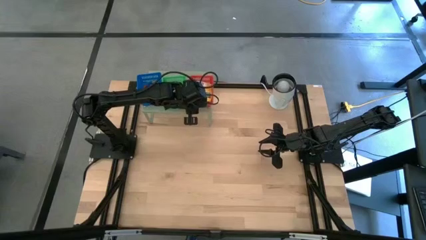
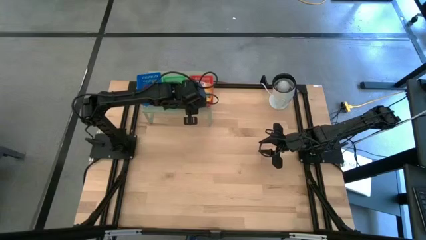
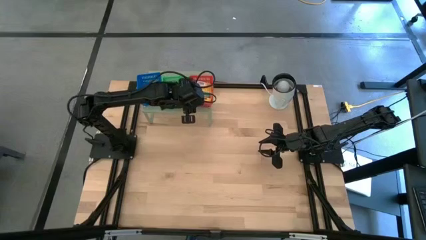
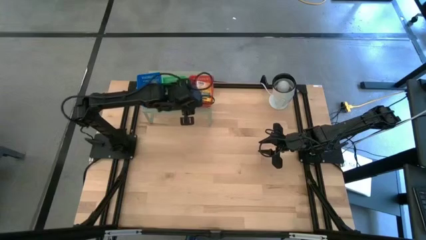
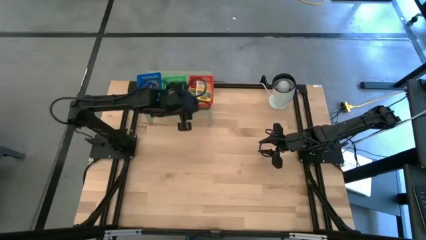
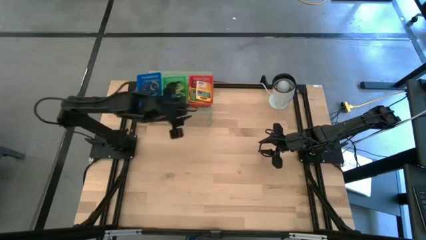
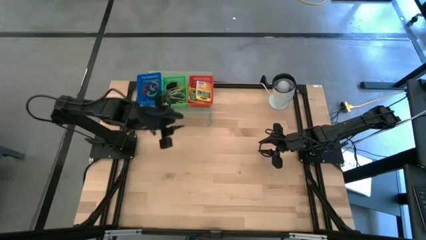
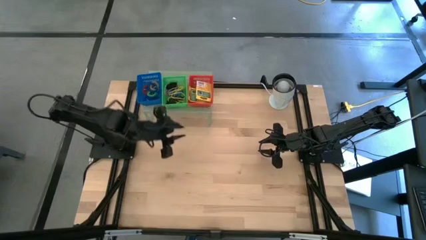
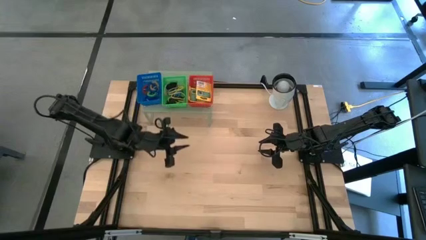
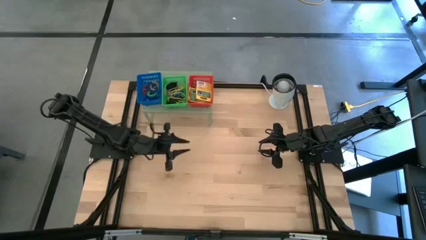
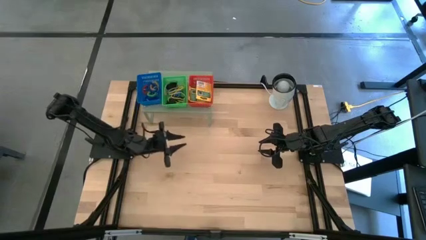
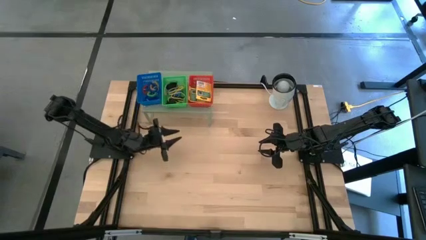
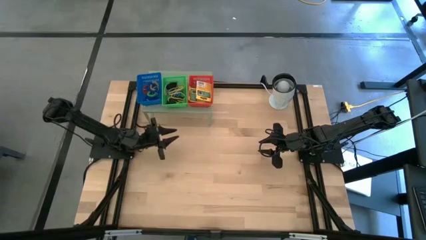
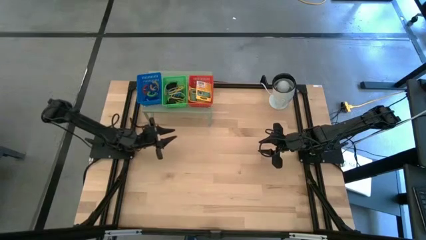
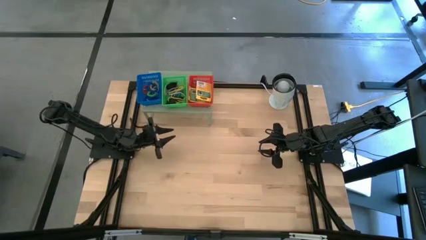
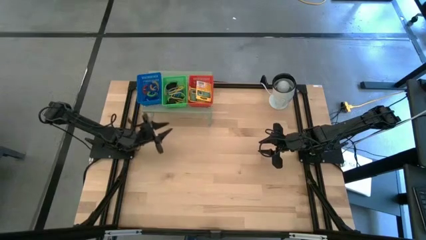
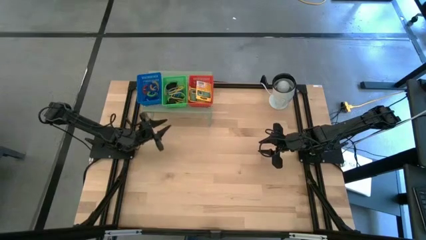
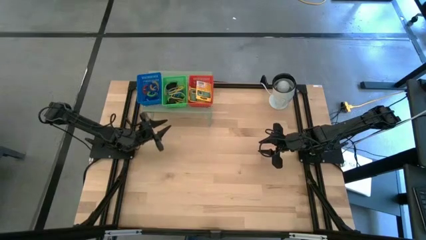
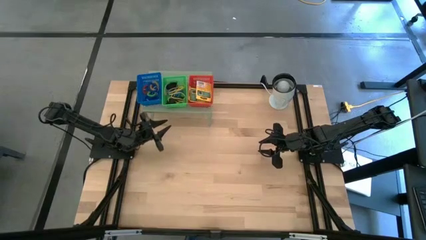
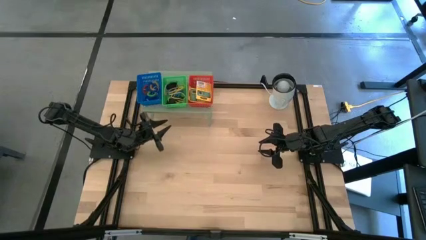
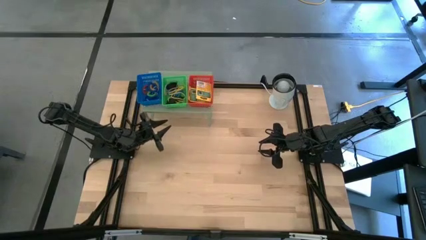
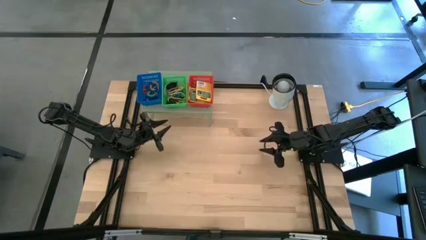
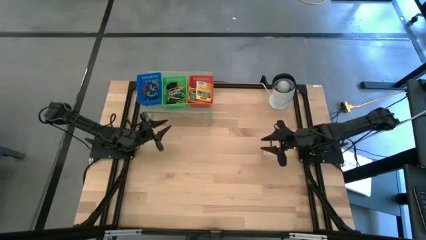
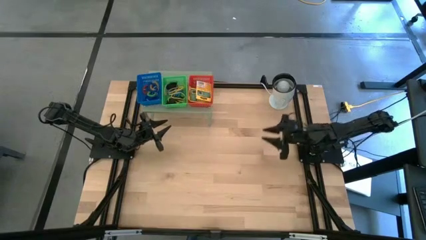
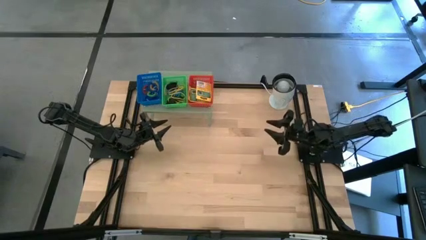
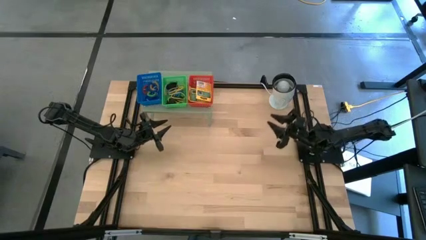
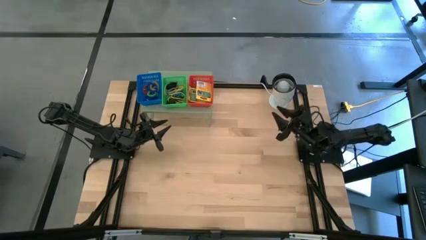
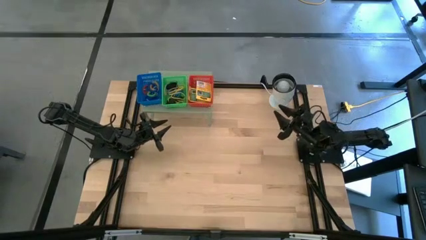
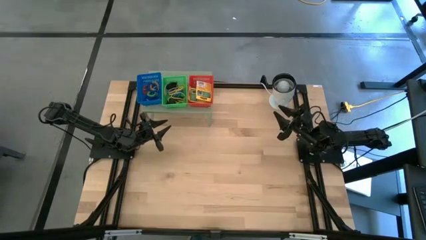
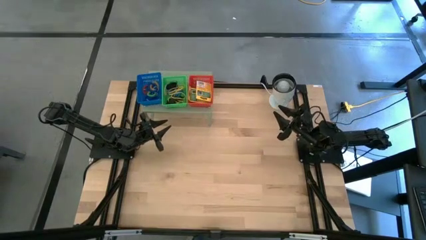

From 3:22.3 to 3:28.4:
Task: Pick & Place Office Desk Supplies
Return to Home Position

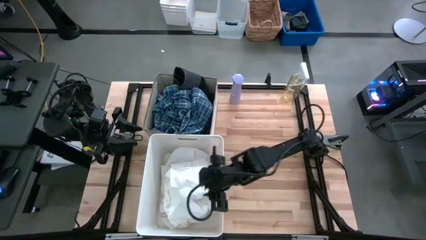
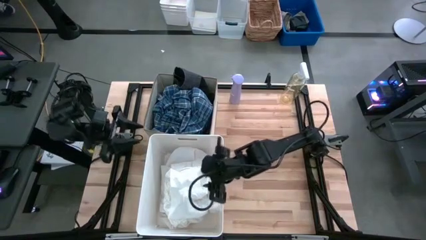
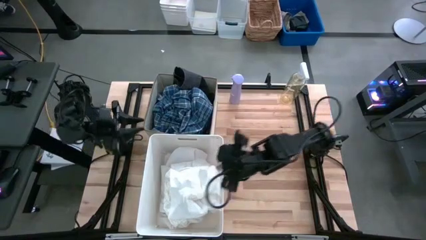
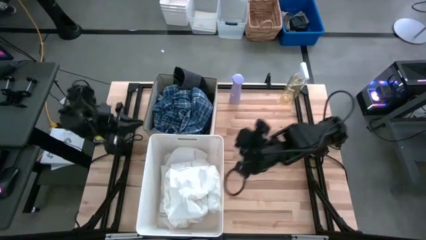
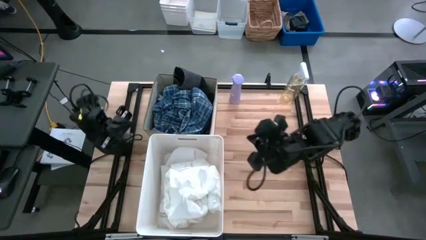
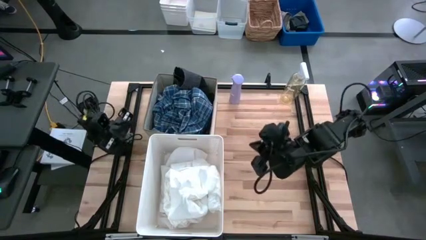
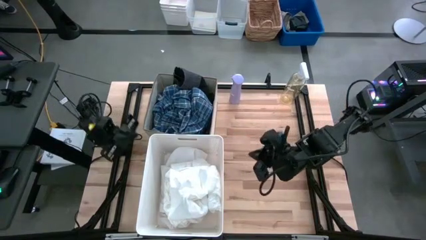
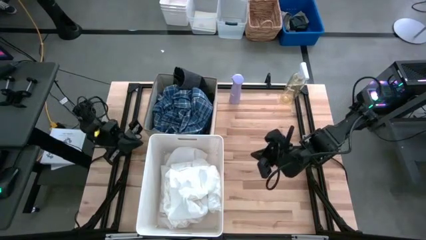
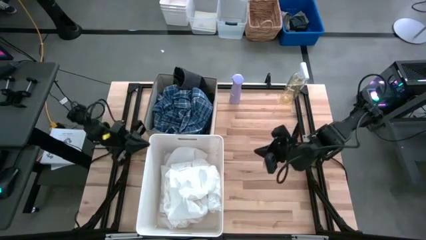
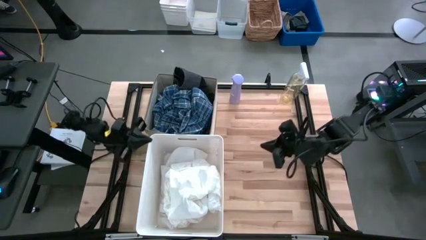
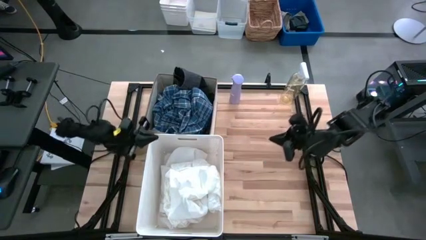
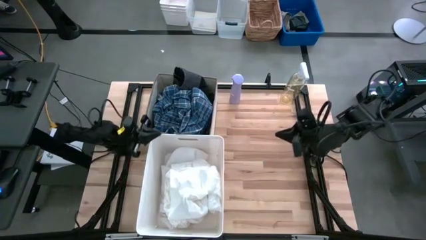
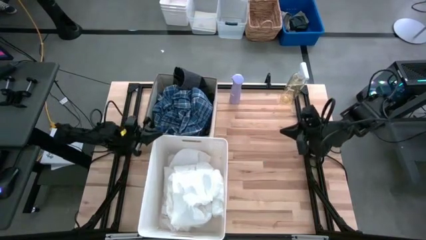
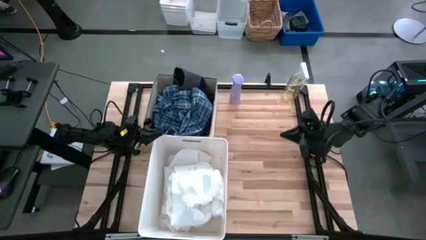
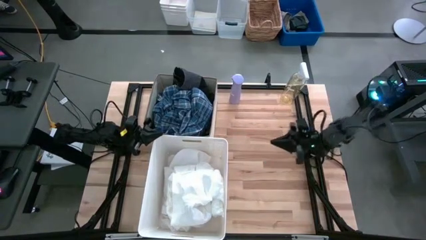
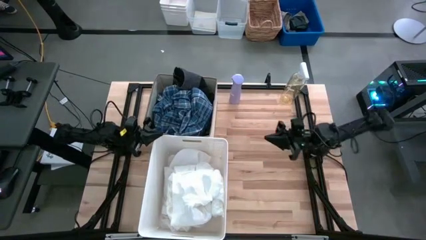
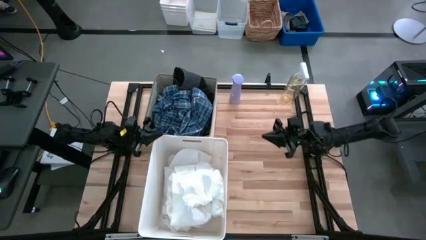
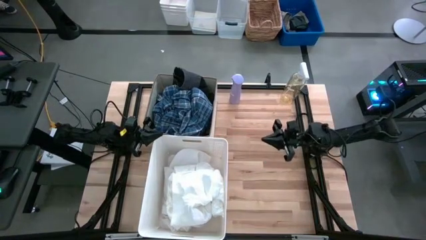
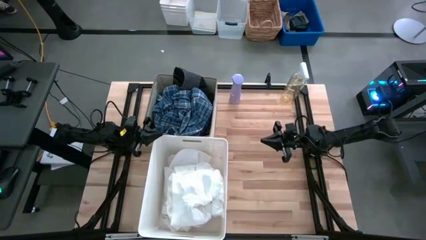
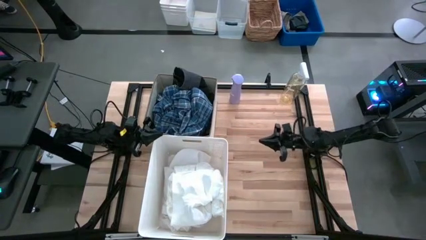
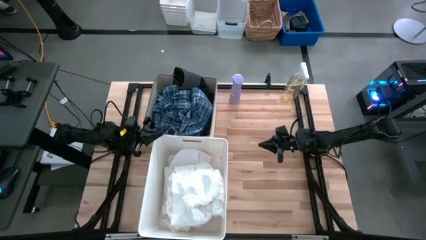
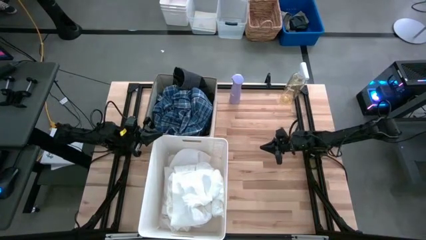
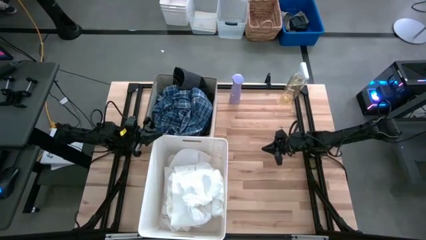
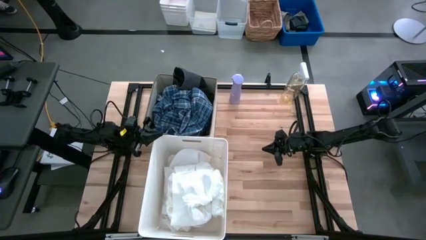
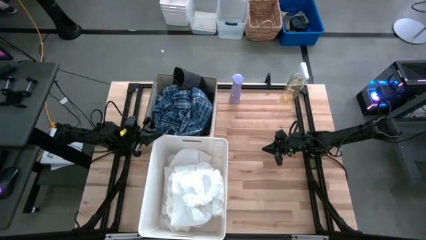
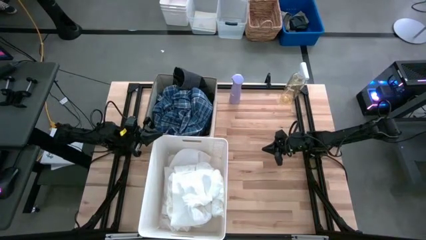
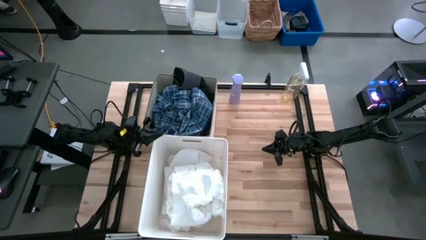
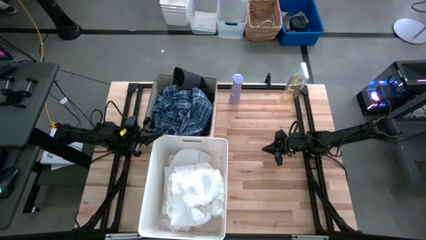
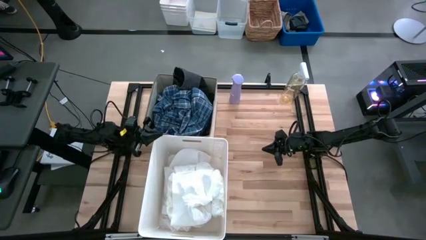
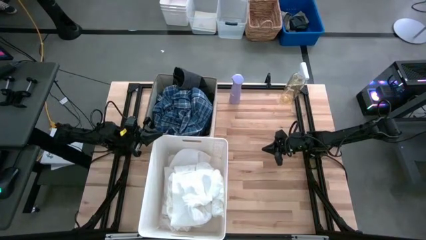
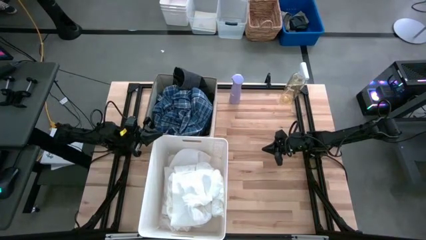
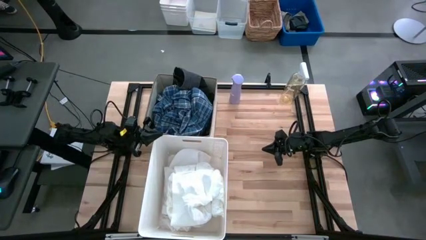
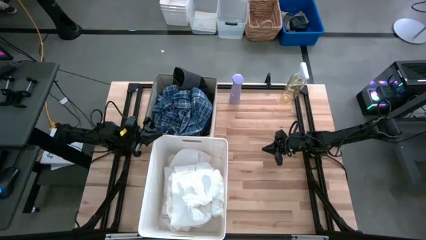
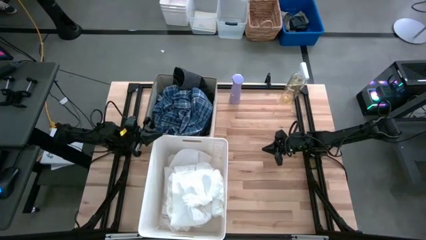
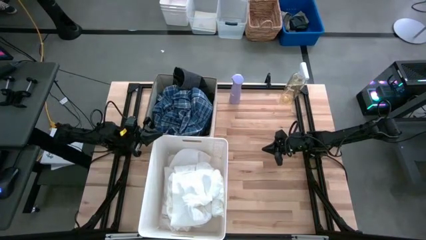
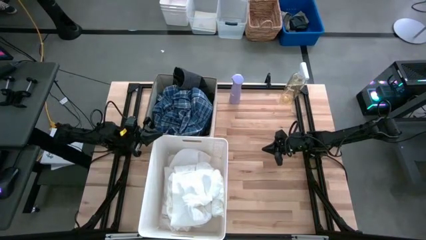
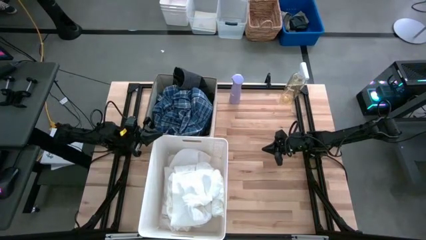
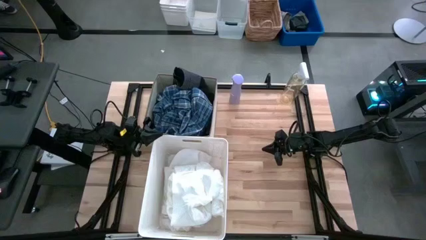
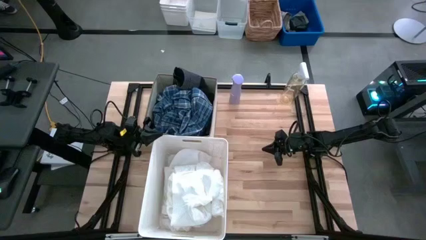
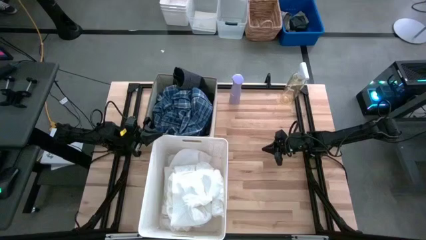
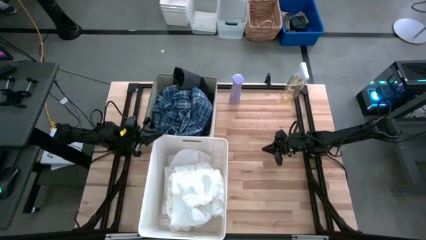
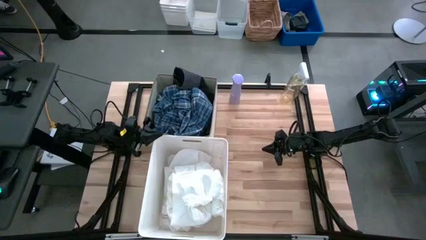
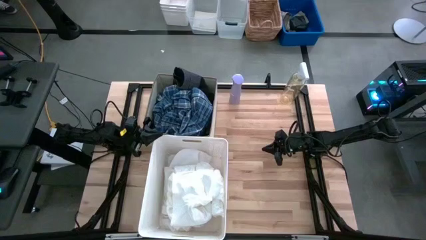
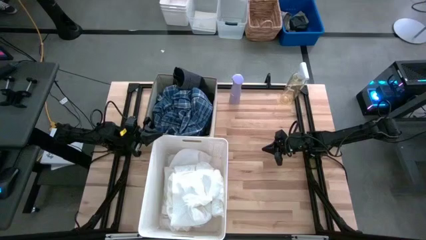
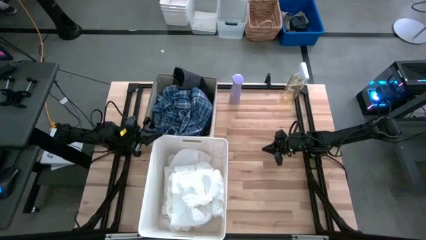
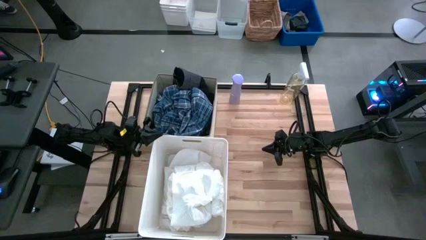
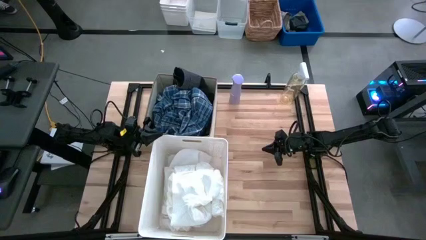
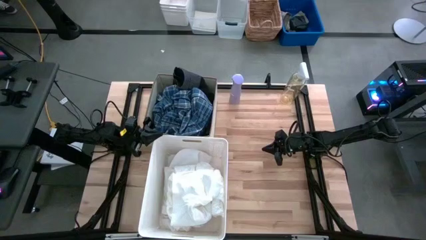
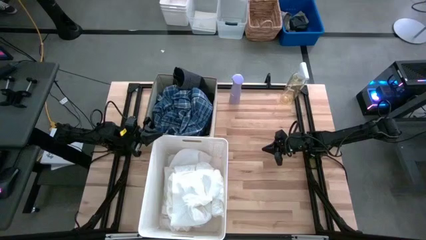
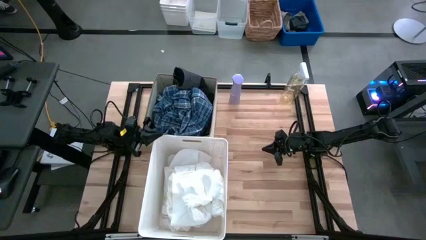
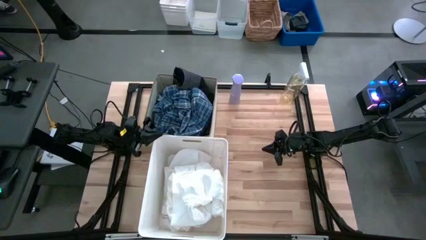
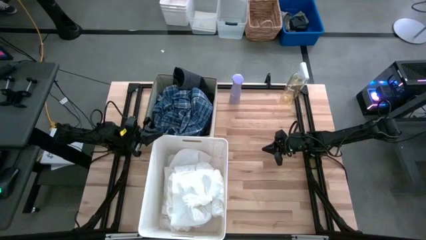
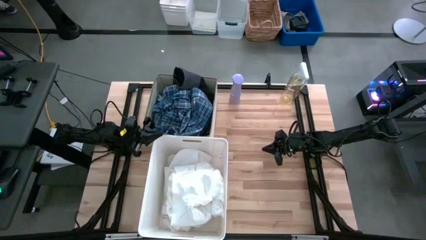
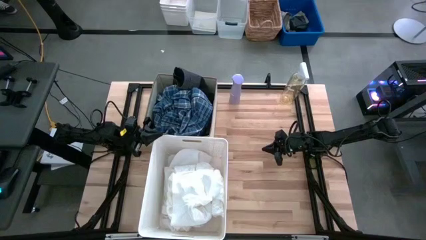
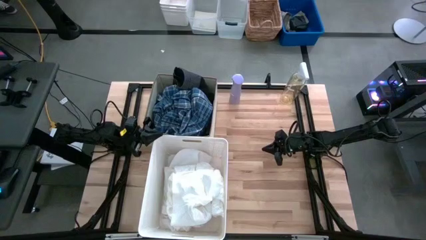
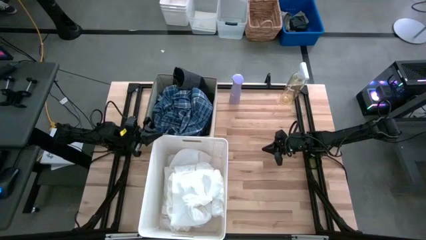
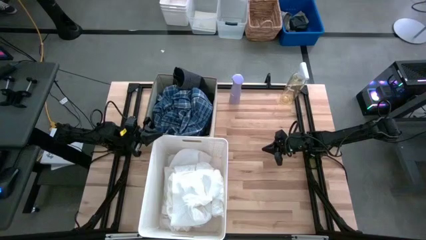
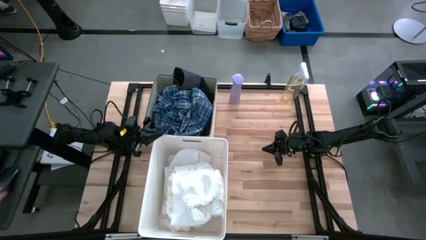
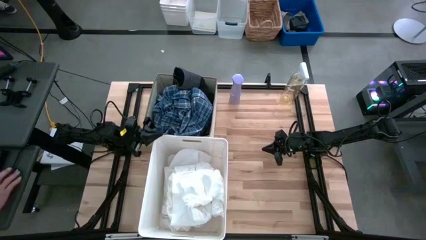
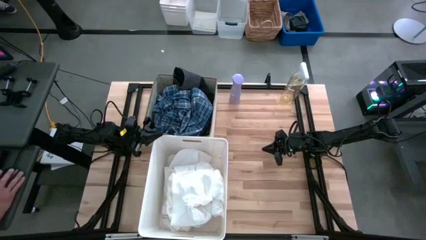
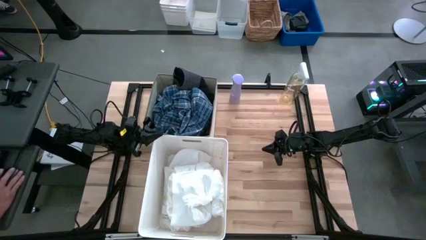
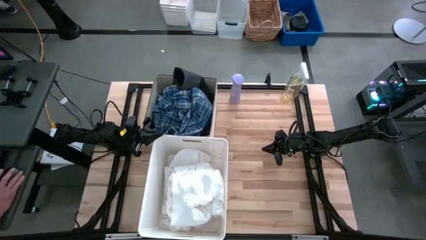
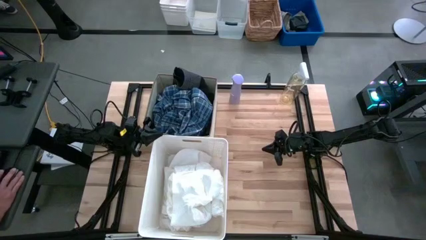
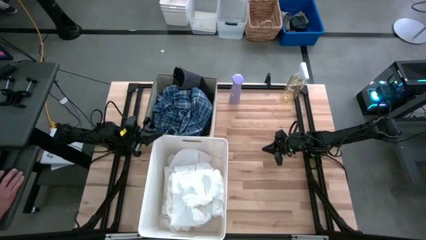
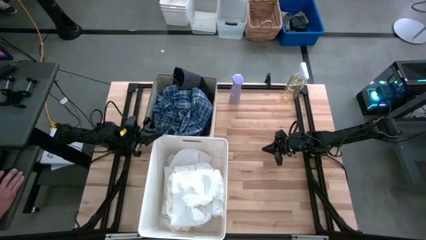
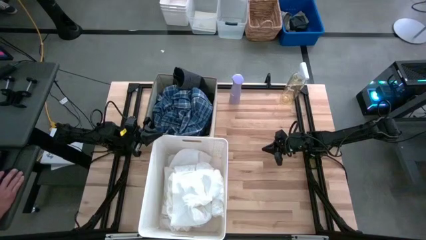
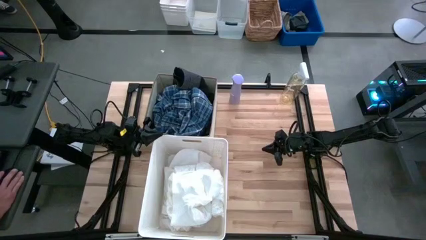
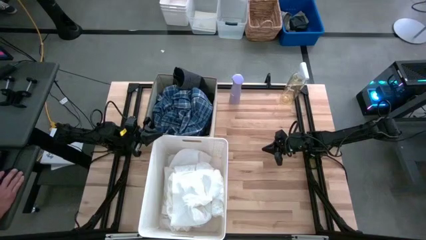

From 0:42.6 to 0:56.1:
Task: Sort clothes
Return to Home Position
